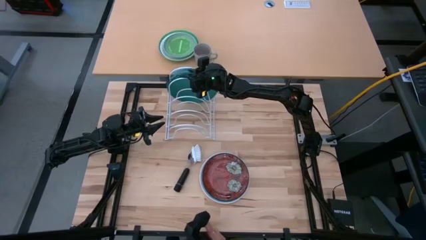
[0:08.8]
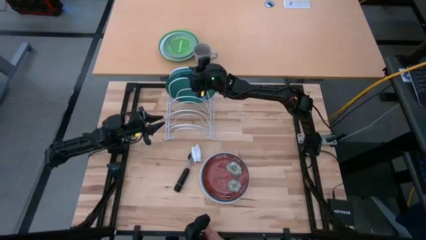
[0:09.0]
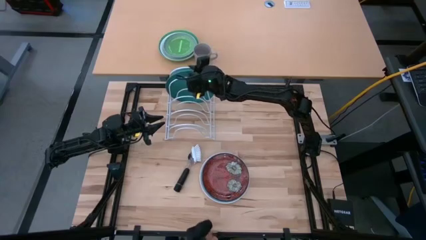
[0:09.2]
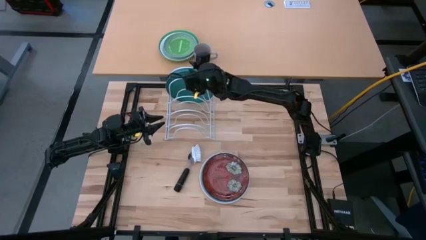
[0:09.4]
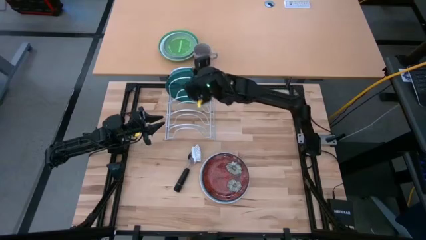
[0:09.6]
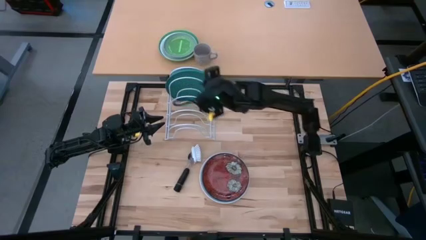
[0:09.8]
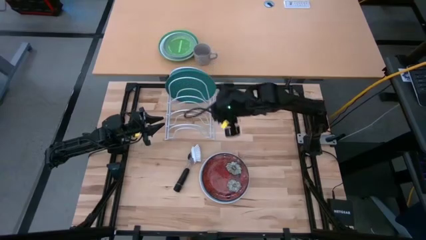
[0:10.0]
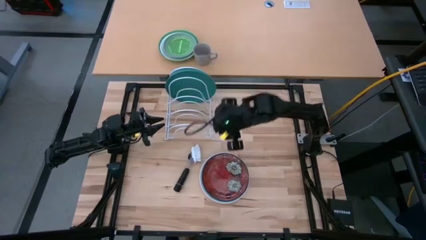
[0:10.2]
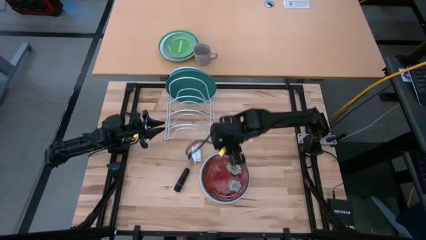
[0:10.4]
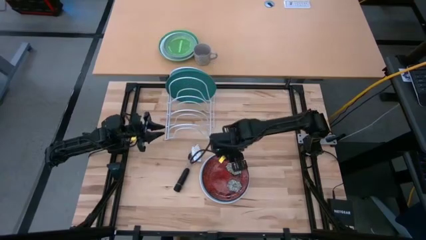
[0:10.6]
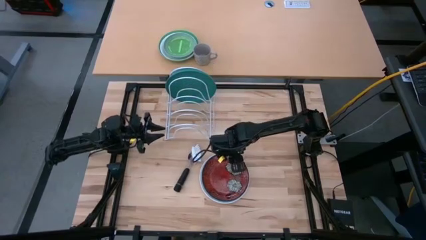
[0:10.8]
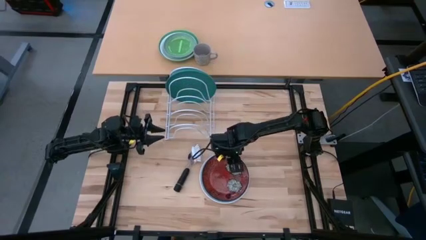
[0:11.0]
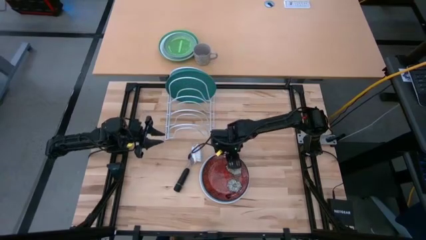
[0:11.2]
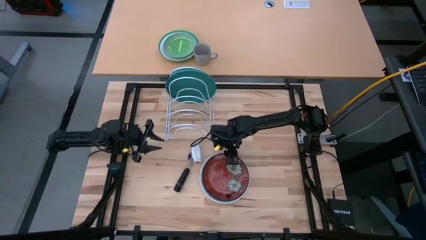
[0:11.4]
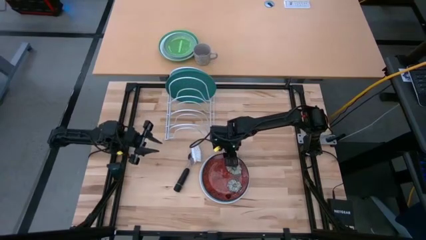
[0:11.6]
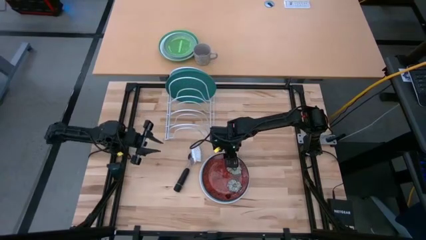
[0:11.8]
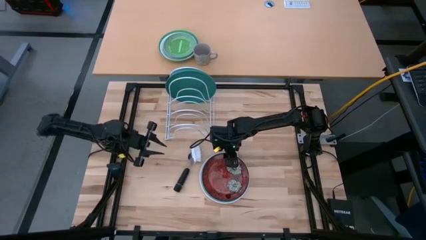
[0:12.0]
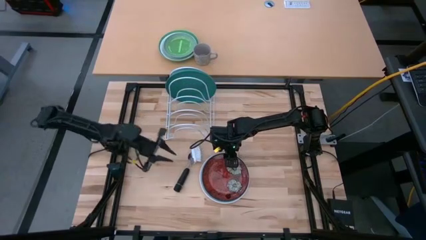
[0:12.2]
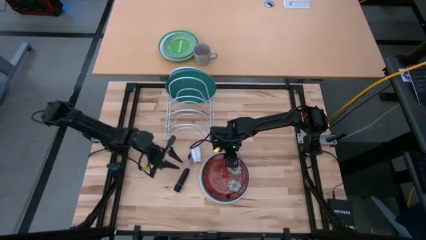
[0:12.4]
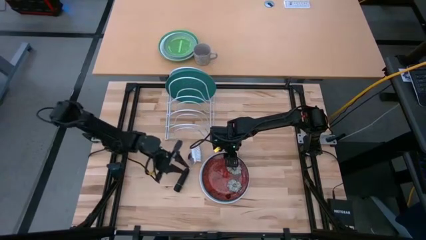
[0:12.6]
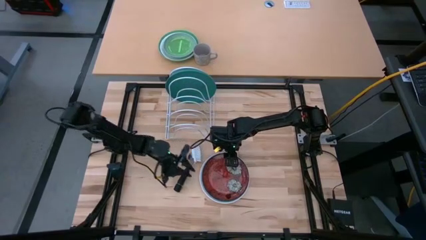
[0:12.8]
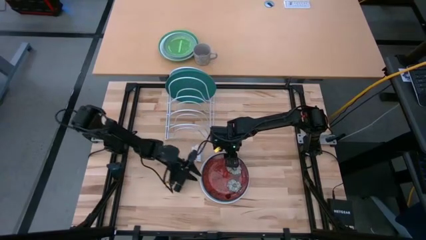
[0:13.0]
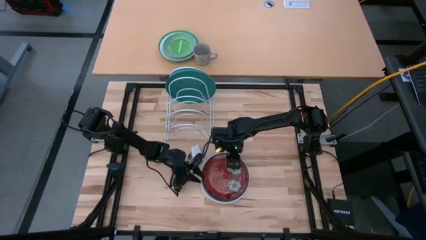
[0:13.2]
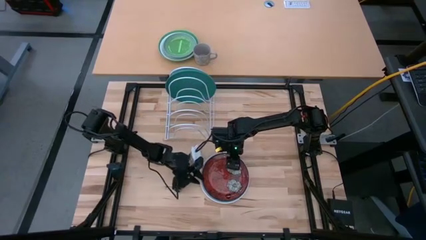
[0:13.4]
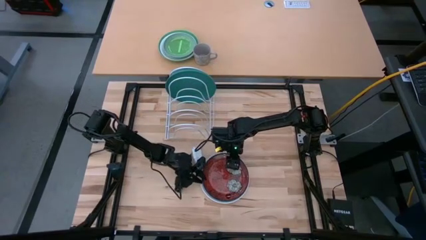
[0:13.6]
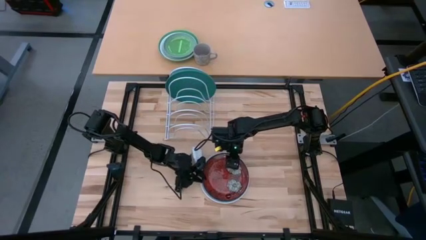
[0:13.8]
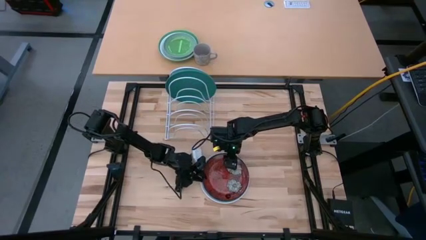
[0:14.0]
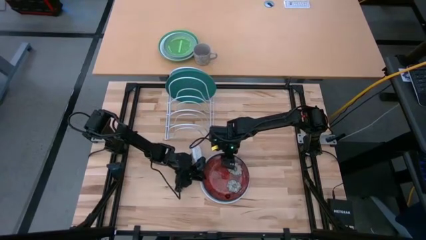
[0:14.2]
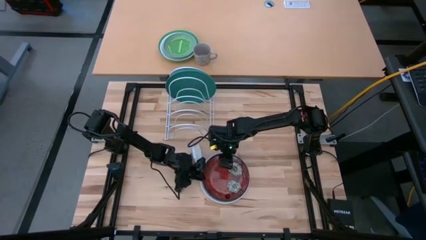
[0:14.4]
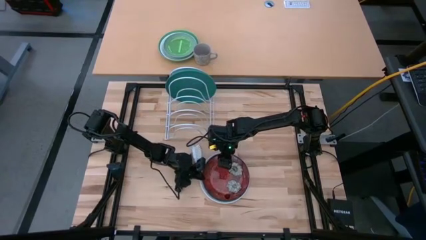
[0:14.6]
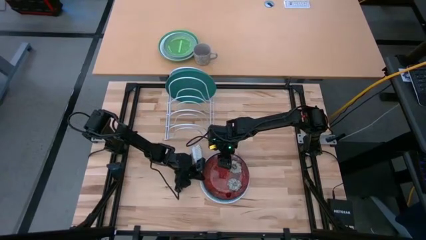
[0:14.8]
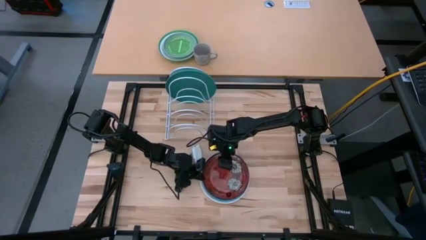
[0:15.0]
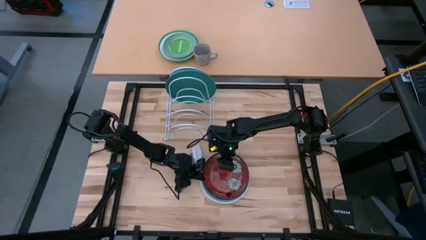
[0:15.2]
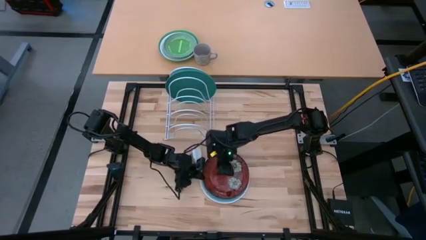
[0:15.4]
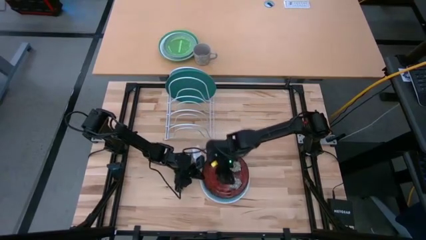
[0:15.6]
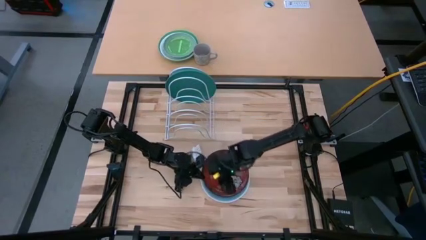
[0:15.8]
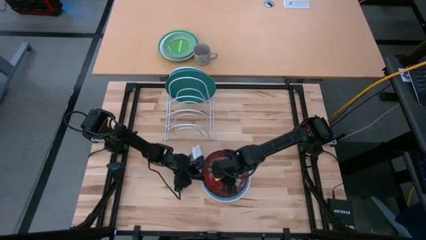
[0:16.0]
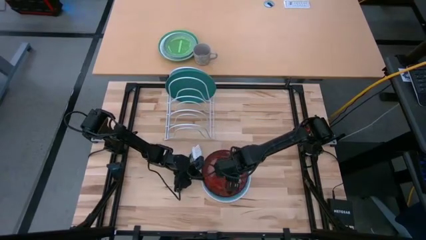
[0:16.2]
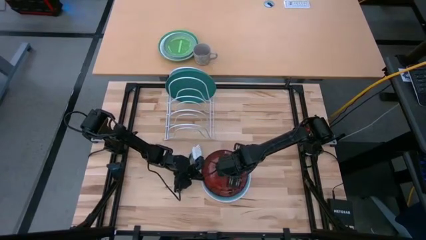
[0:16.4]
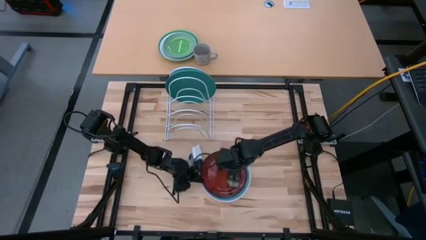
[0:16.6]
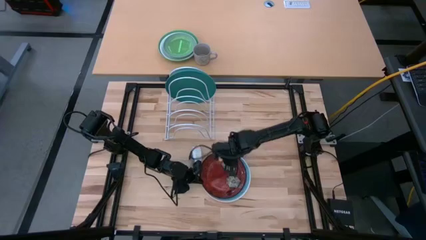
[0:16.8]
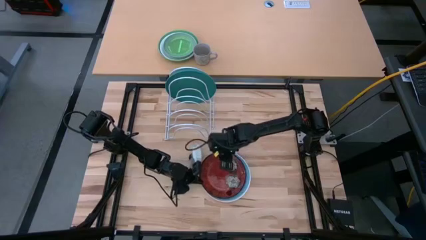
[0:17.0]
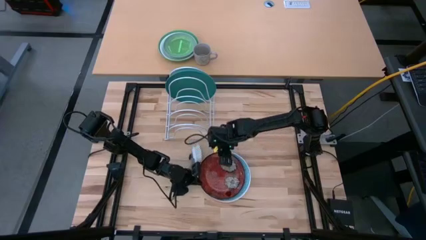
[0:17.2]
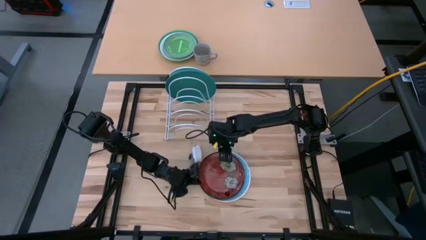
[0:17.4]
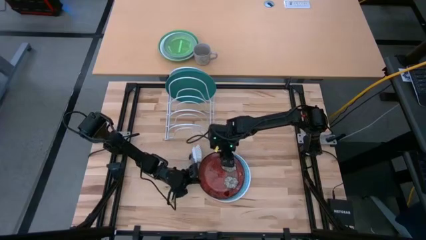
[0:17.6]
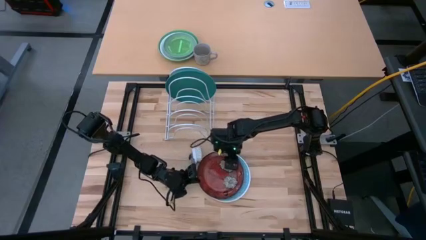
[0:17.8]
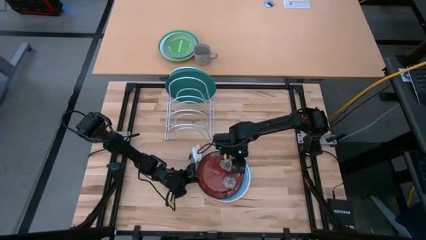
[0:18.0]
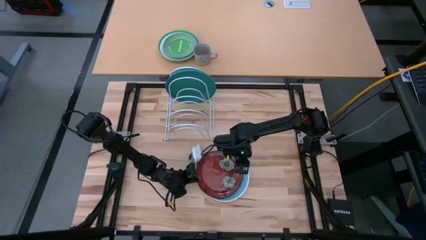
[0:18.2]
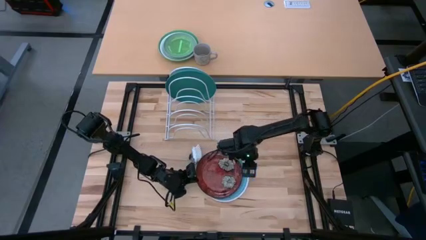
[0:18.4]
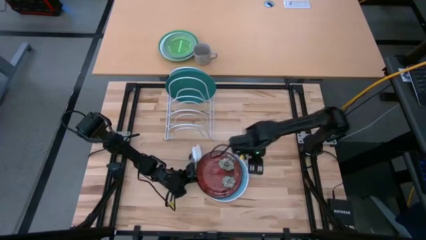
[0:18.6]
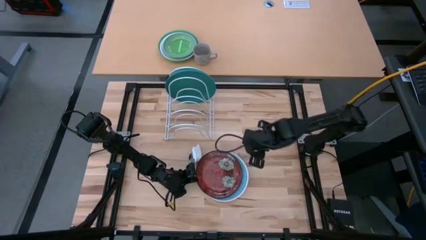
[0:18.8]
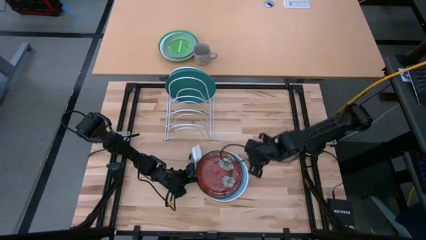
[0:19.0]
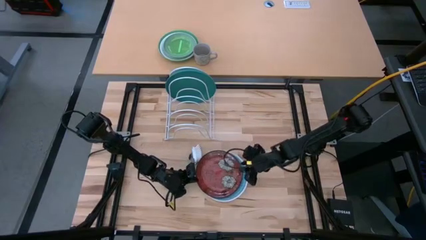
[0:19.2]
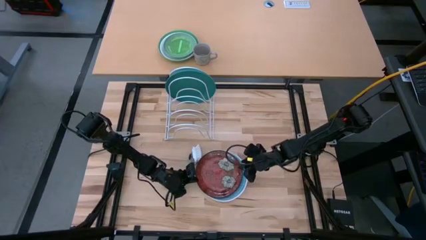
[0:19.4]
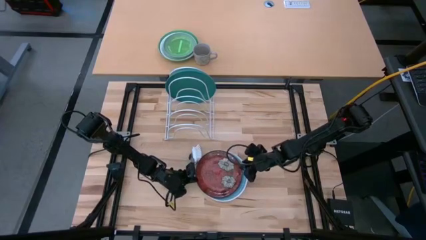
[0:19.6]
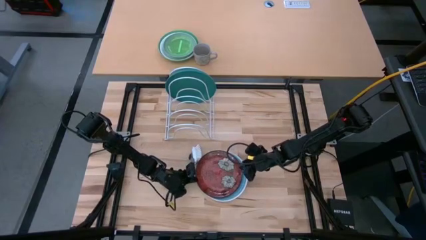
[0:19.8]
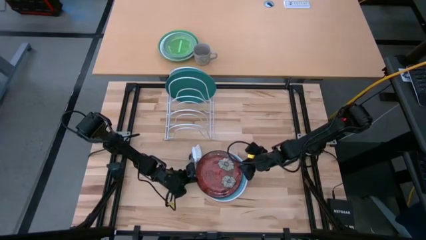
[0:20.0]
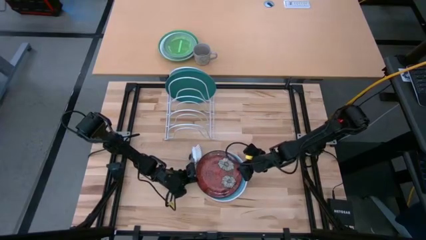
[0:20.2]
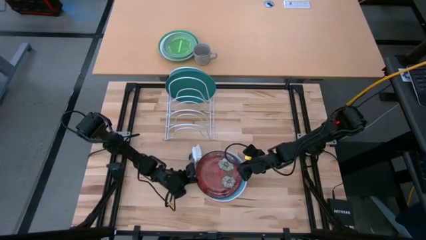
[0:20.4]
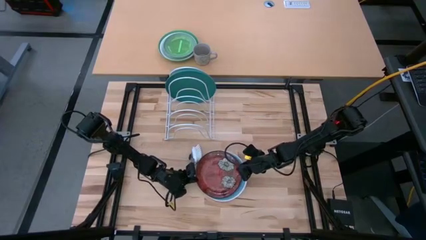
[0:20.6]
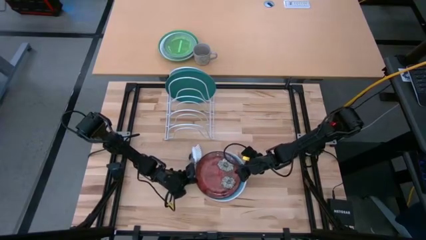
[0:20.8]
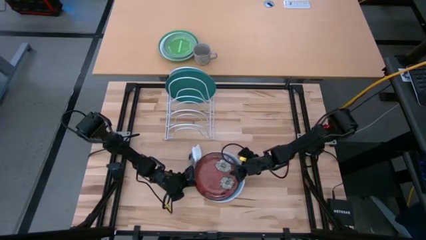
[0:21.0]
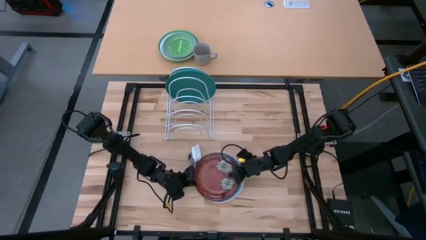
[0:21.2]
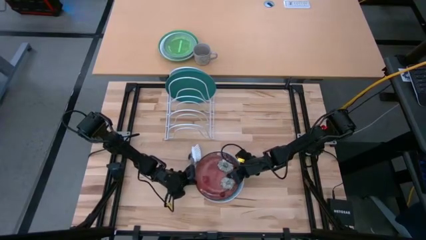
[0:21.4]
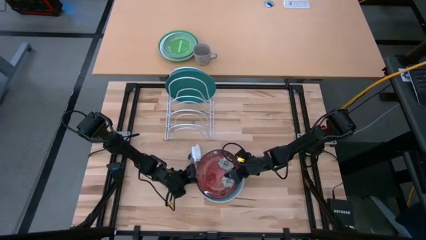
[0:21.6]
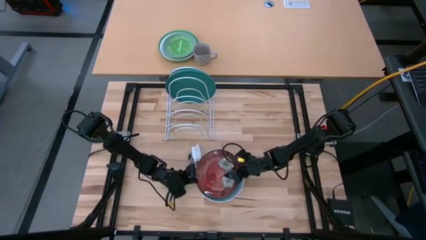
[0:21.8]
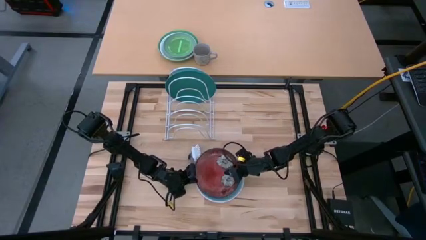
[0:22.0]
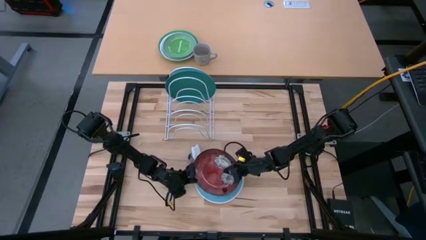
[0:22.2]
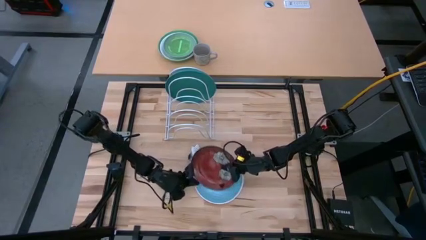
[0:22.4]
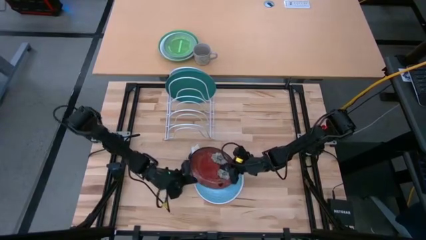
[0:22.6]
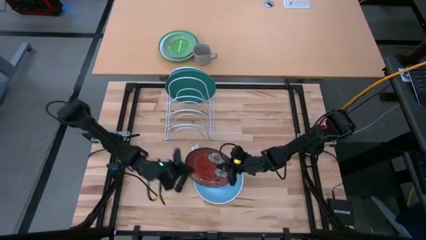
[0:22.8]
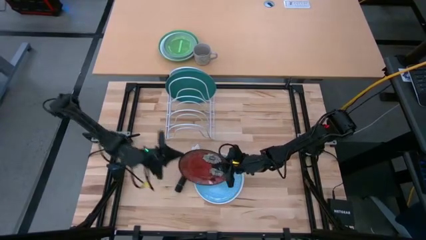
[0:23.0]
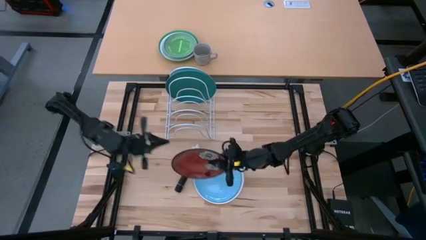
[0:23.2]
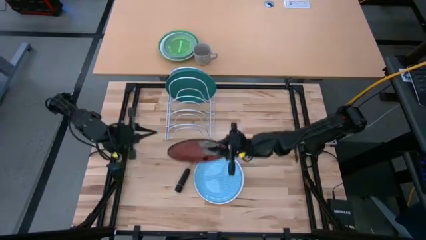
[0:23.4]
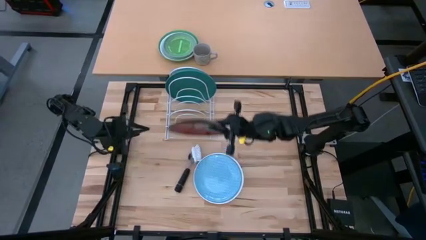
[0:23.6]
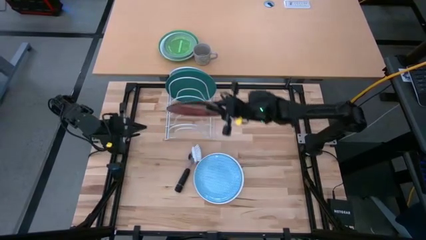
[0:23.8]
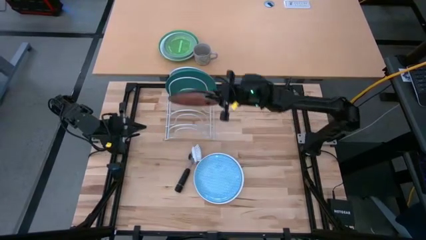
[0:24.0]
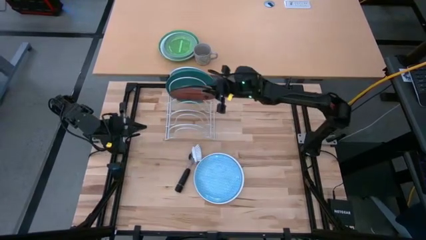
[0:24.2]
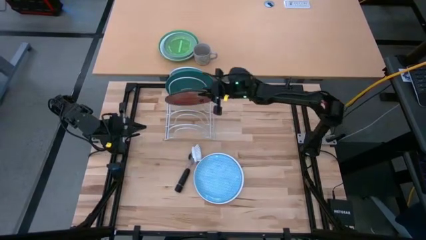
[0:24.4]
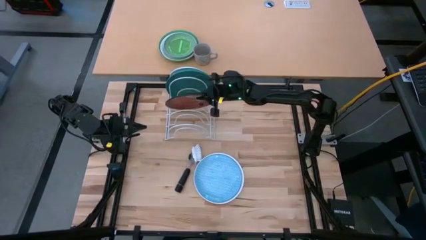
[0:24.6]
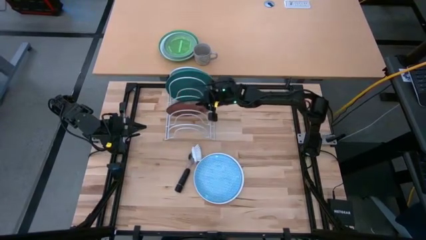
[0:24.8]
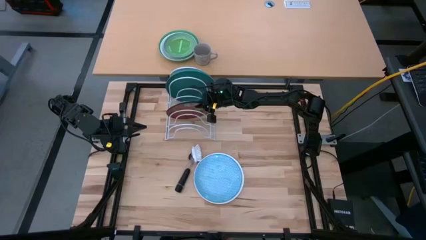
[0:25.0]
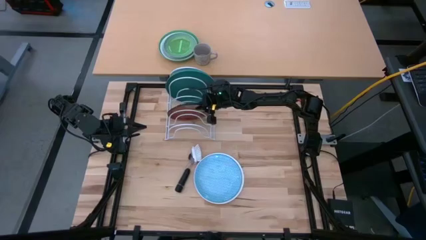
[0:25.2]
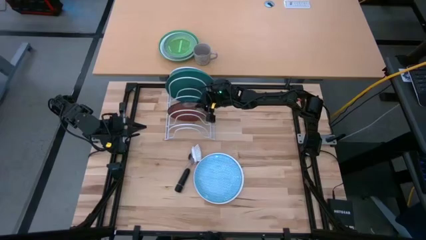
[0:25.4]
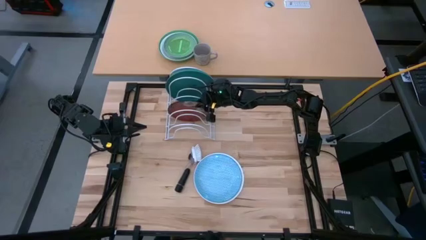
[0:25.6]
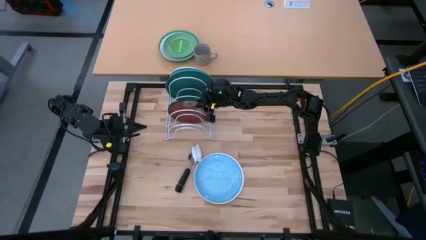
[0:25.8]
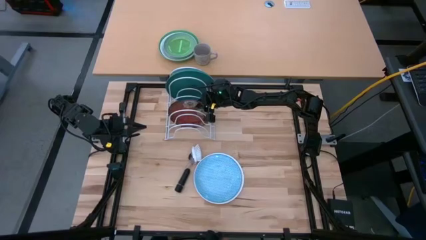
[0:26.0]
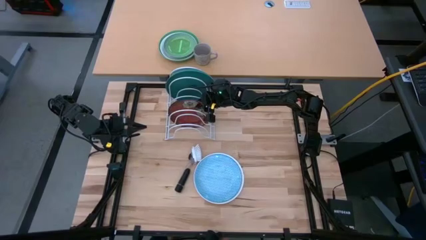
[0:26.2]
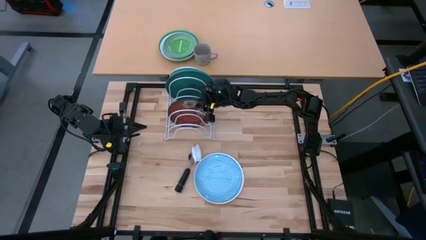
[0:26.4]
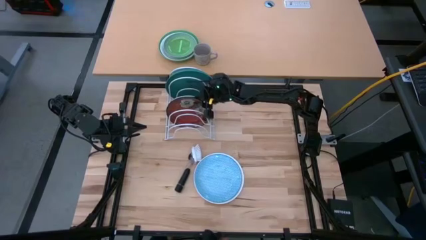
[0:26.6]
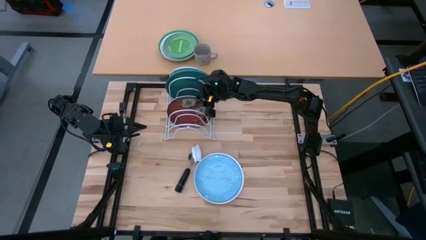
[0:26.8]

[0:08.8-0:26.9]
Task: Sort dishes
Put the red plate into the white dish rack
